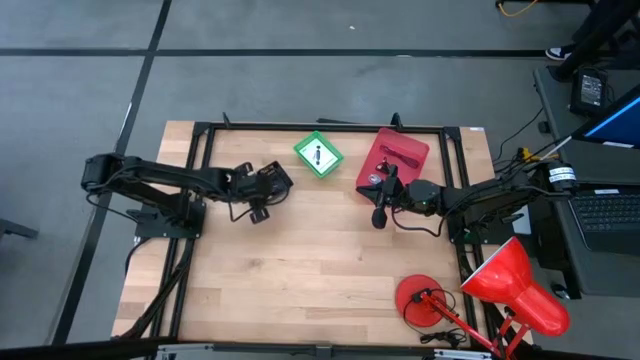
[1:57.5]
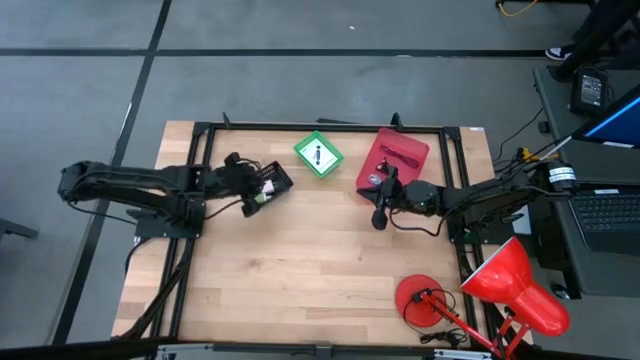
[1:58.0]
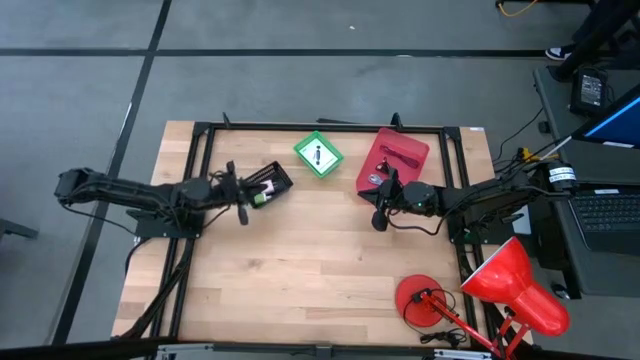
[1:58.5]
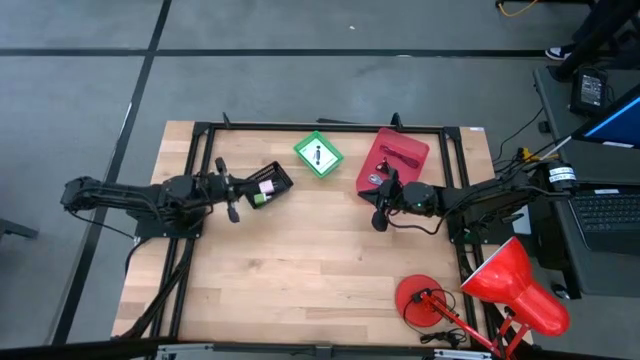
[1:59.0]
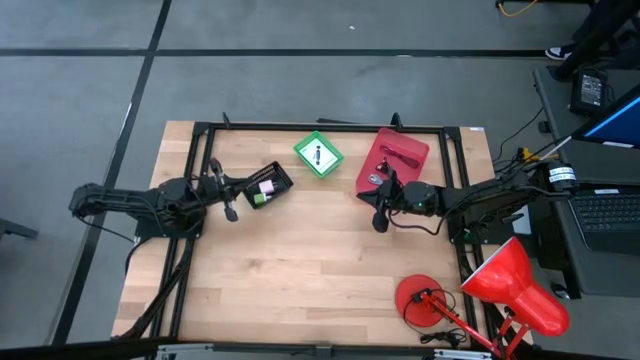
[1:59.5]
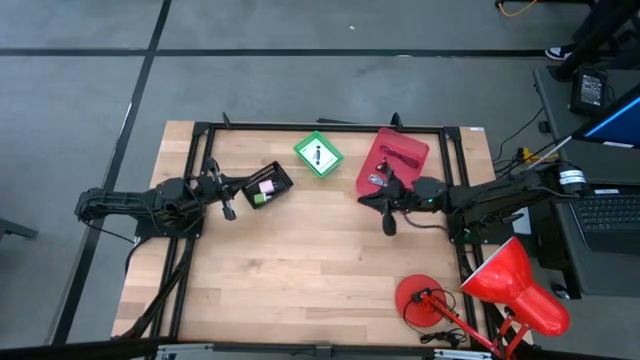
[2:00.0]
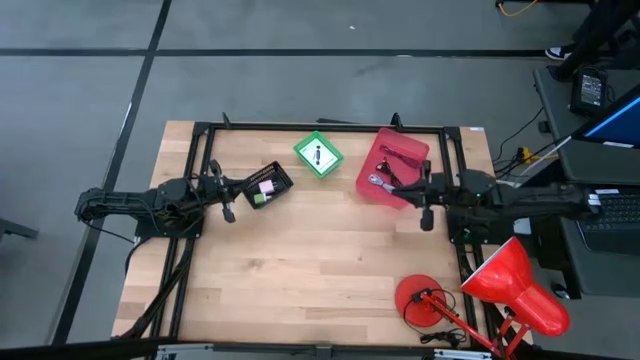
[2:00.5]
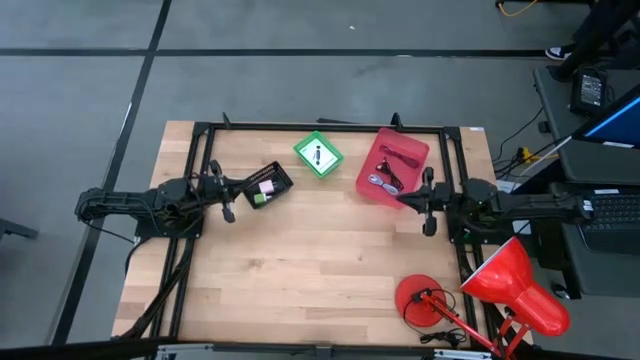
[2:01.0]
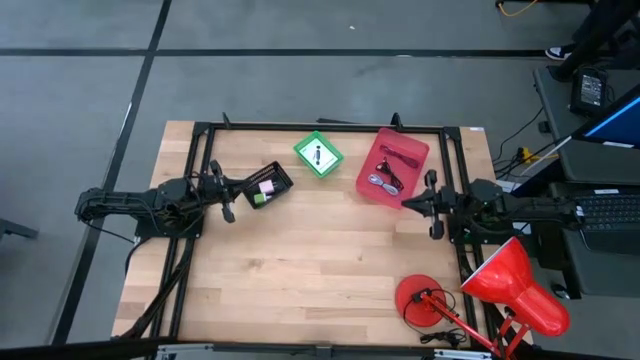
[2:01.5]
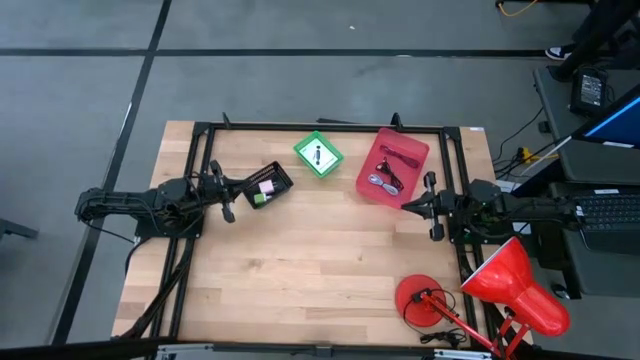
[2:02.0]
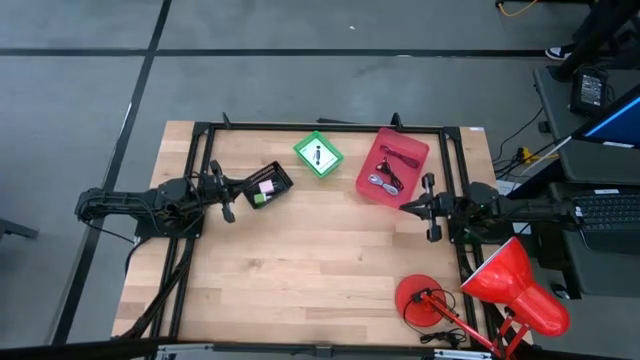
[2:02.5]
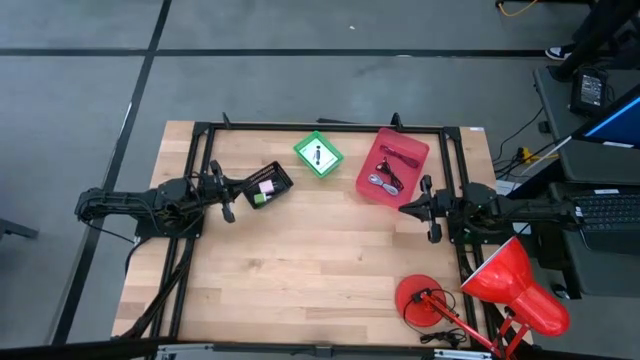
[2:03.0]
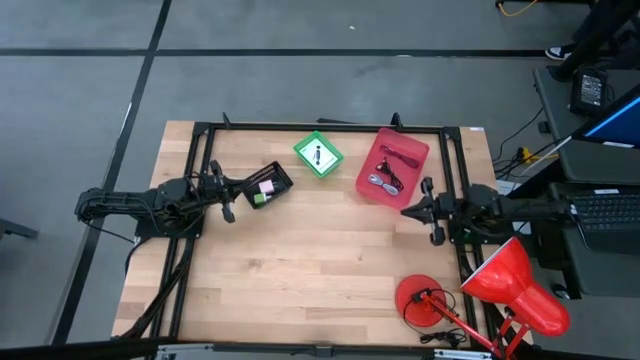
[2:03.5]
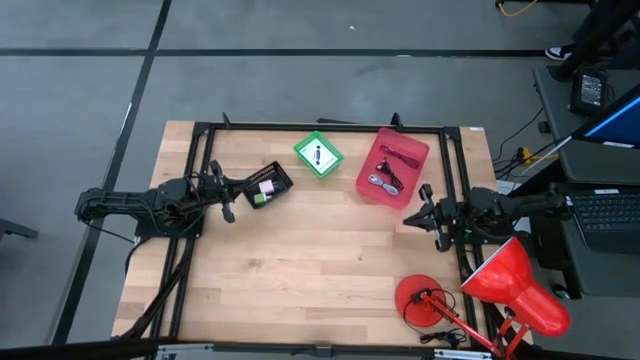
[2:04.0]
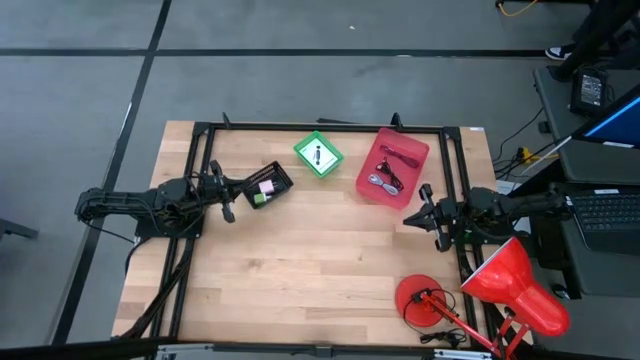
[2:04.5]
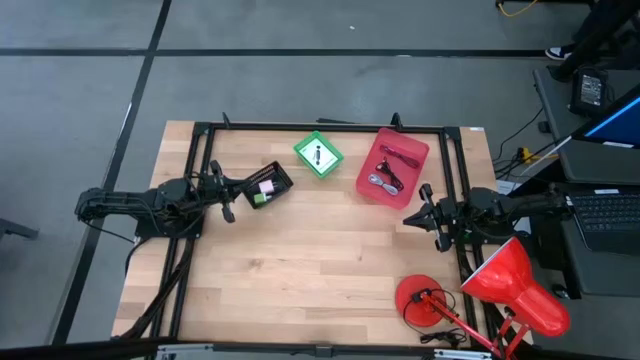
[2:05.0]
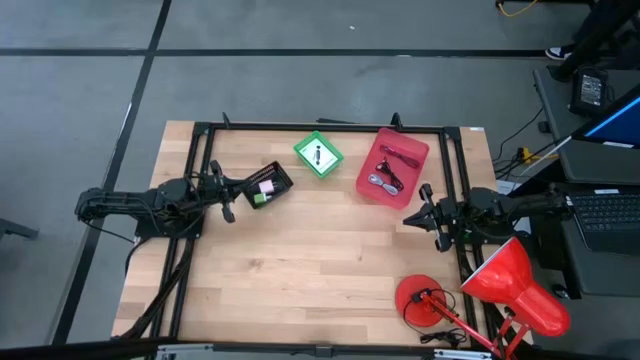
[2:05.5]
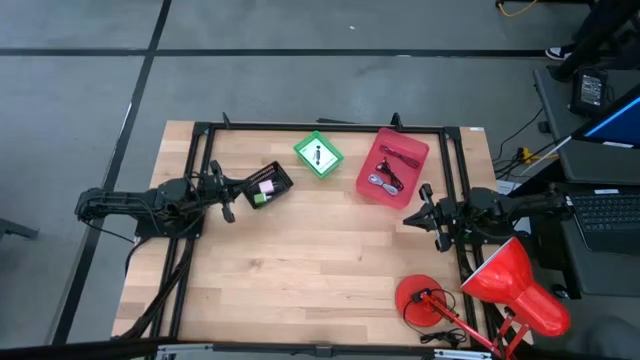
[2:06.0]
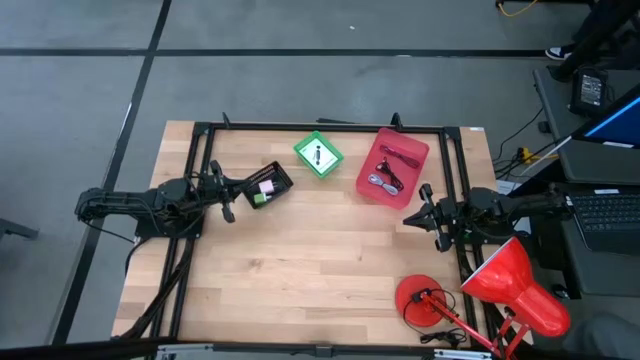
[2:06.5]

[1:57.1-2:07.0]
Task: Pick and place items into bin
Return to Home Position

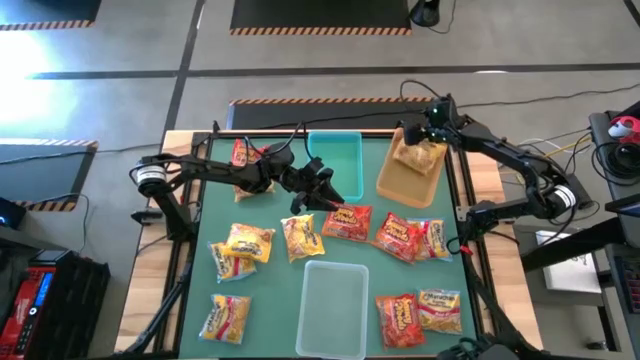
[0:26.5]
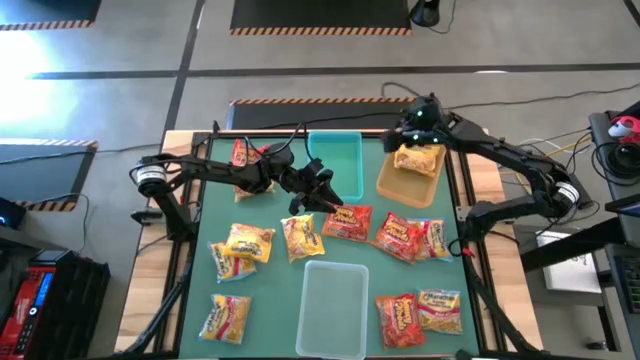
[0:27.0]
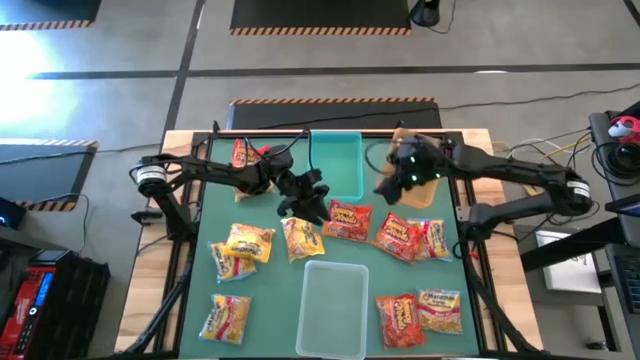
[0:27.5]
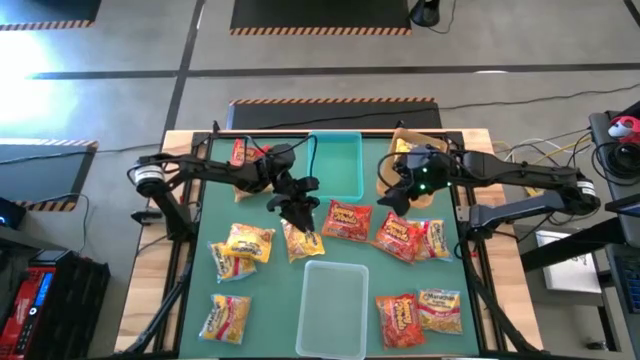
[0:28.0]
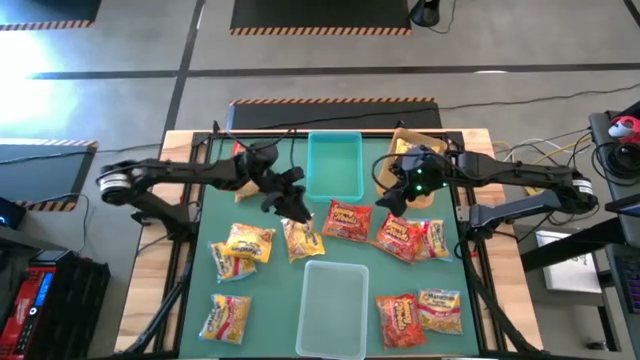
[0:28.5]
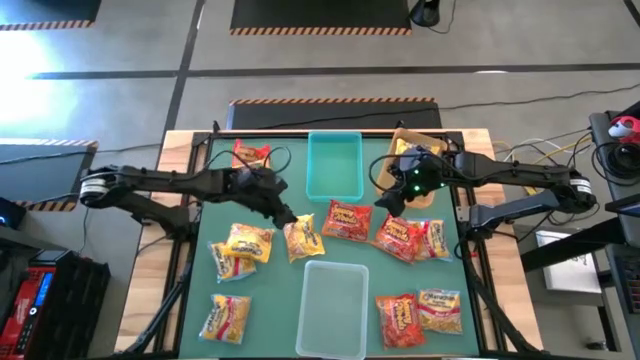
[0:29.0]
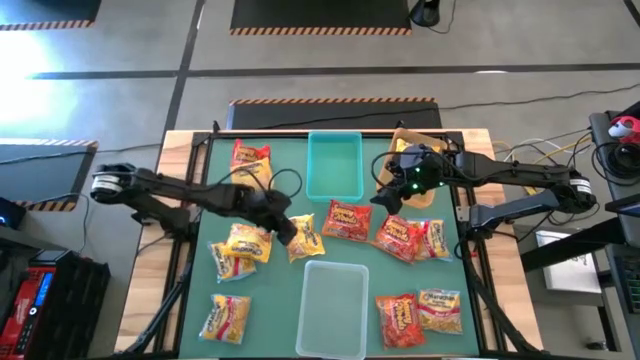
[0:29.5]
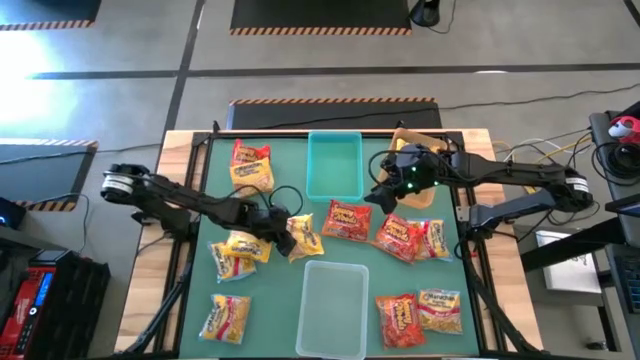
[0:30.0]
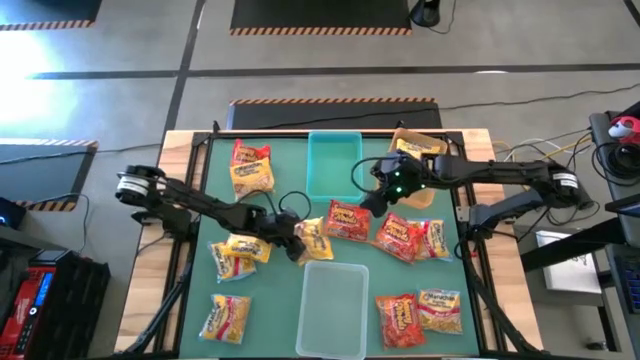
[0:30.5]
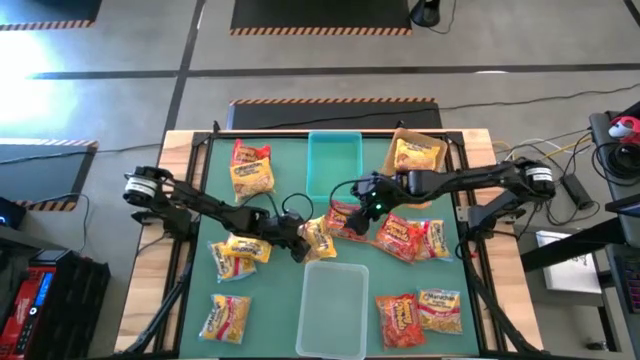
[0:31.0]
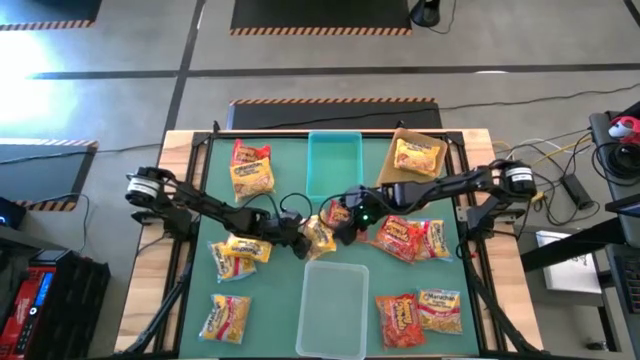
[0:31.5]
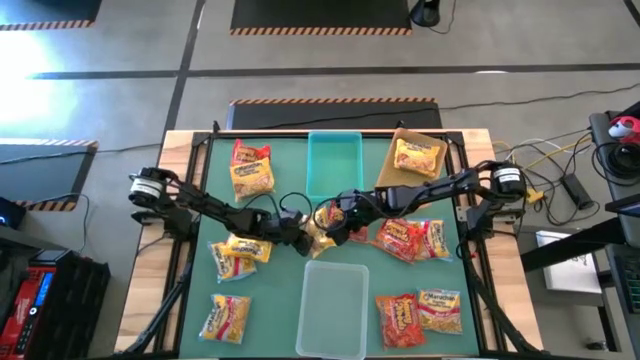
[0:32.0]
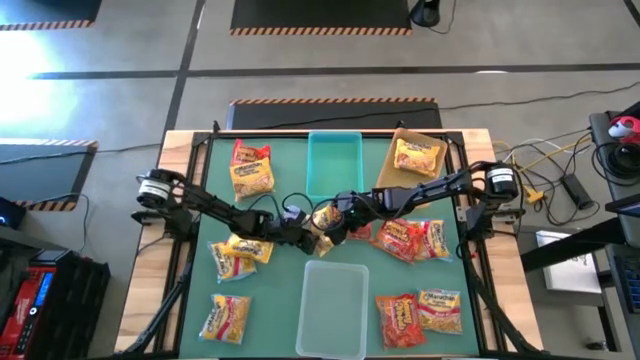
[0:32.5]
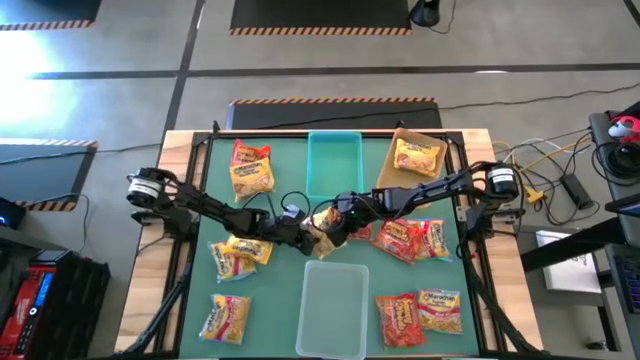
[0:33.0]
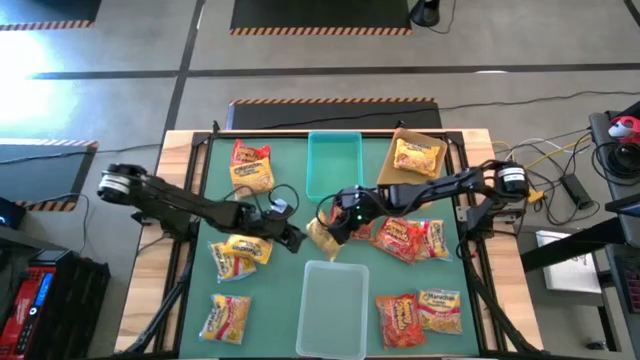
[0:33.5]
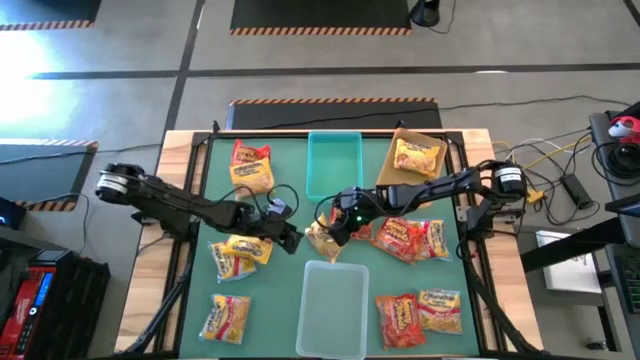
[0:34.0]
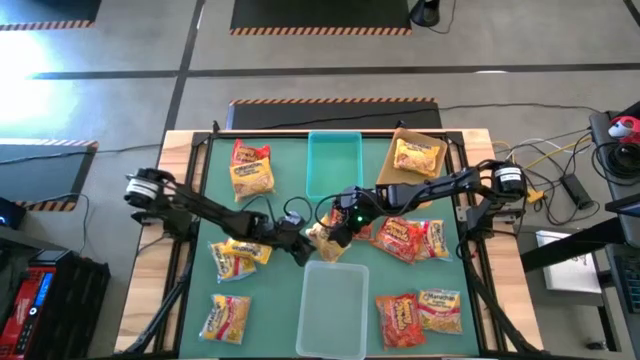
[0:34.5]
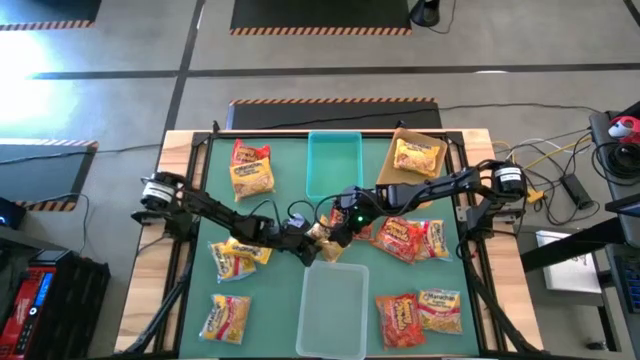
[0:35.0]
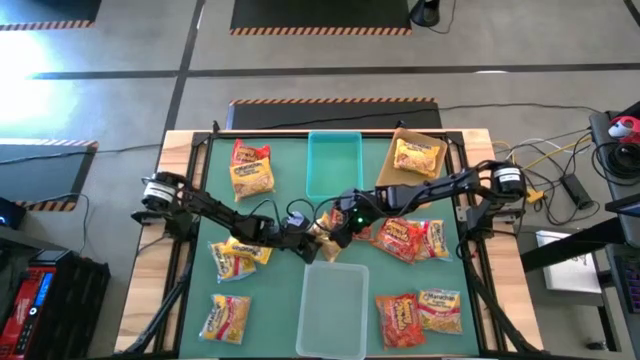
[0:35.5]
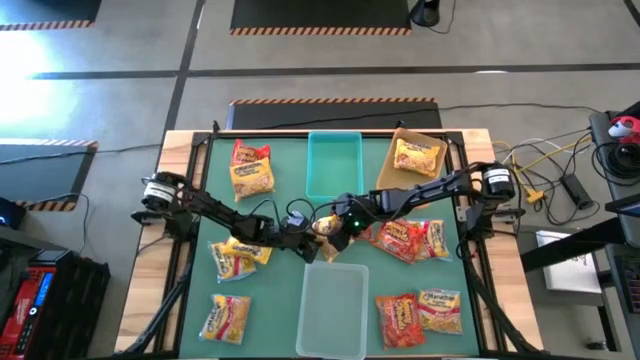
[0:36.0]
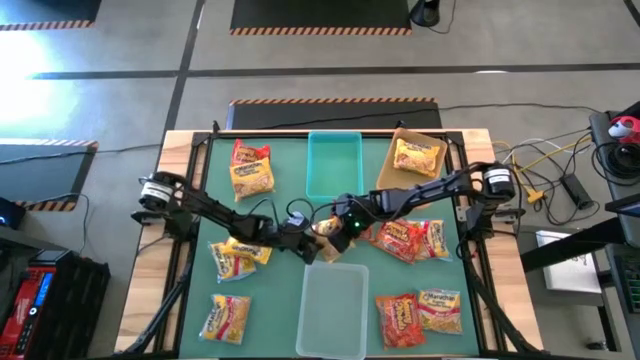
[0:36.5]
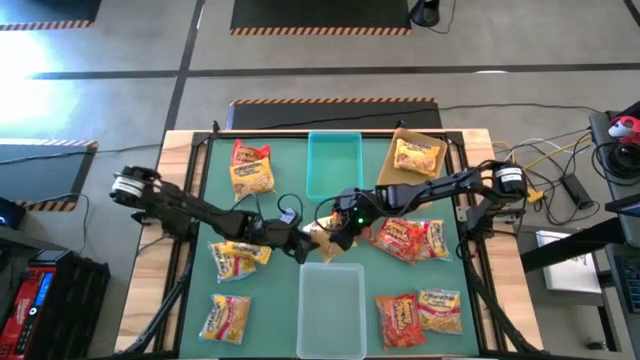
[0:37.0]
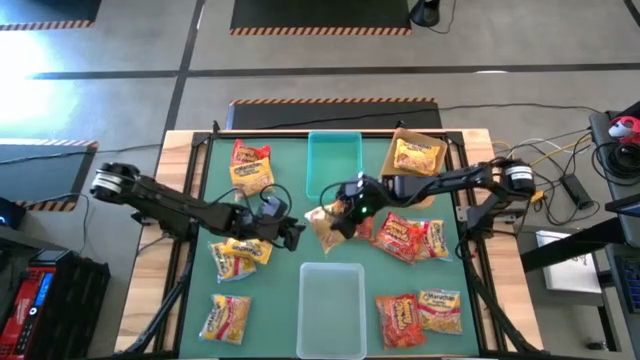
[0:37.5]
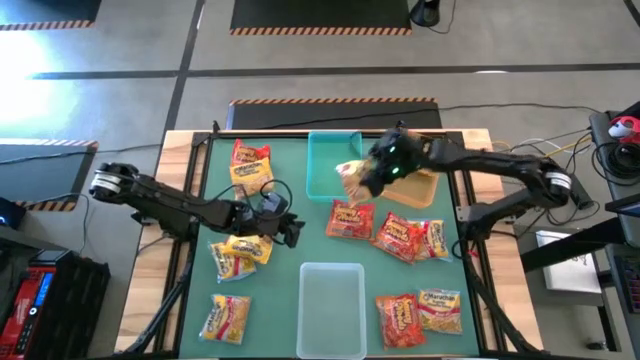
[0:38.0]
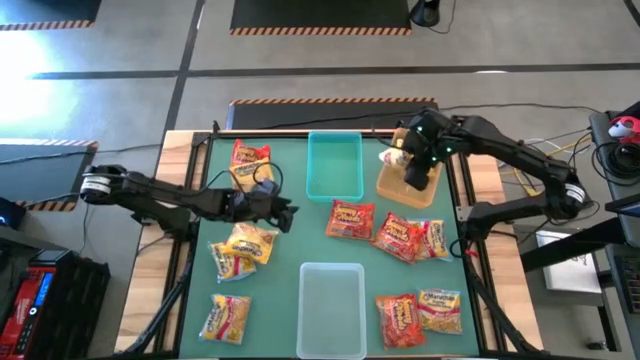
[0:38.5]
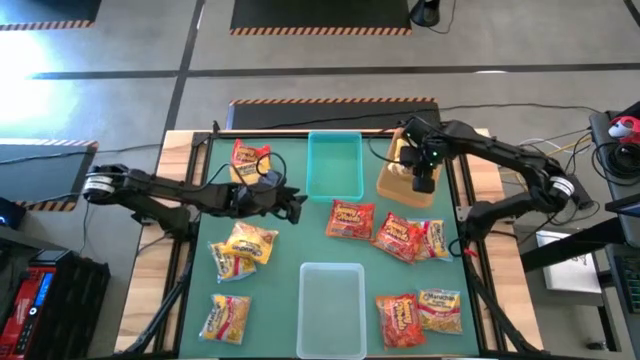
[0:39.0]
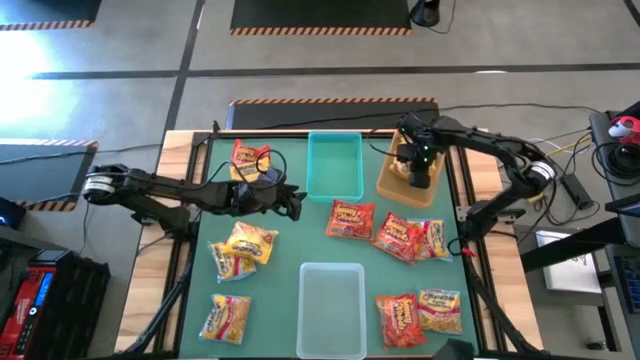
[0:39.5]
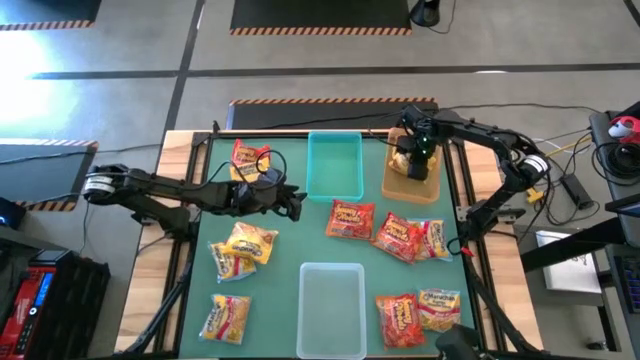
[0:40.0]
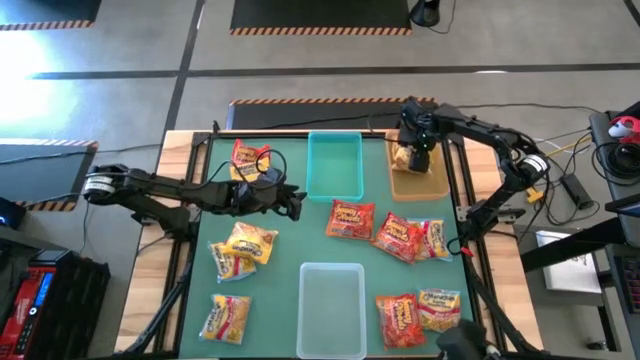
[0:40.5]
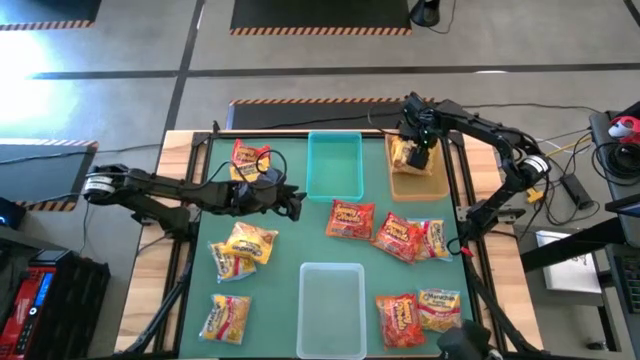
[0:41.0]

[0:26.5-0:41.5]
Task: Sort Maruchan noodles
Put the yellow noodle pack into the orange bin
